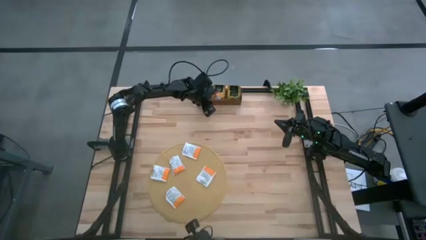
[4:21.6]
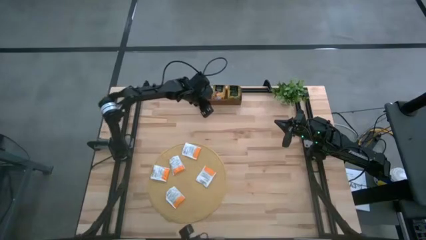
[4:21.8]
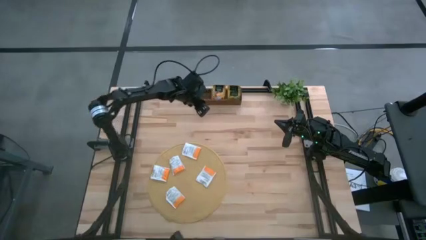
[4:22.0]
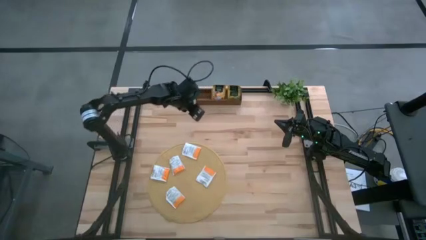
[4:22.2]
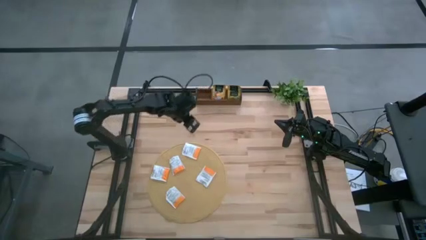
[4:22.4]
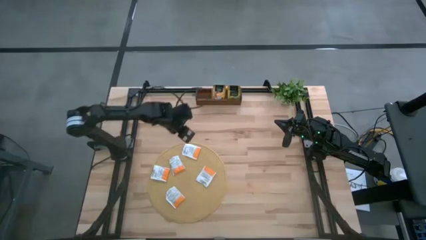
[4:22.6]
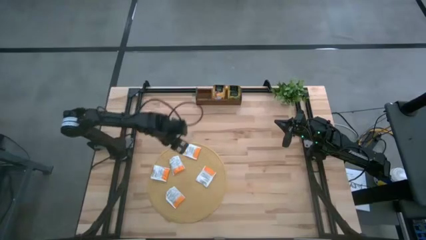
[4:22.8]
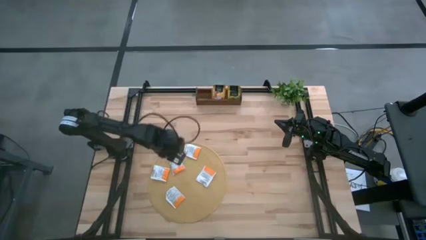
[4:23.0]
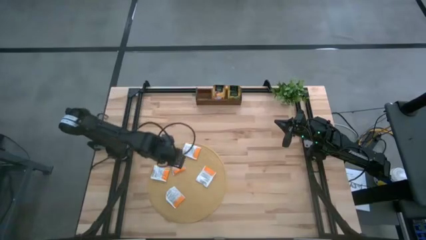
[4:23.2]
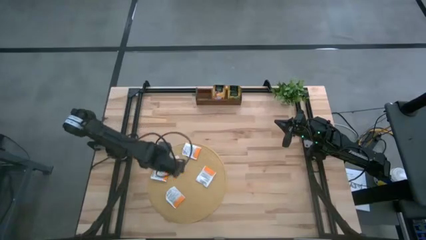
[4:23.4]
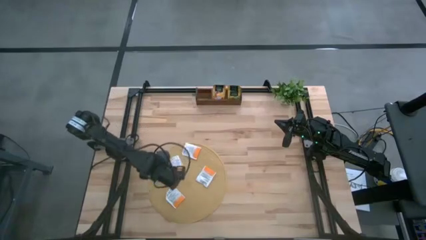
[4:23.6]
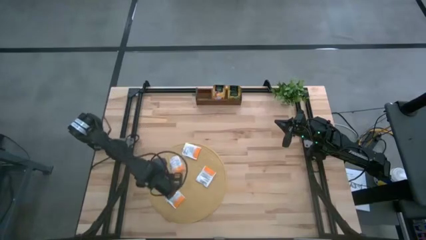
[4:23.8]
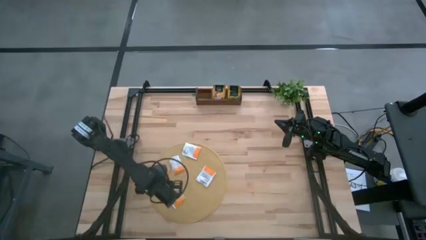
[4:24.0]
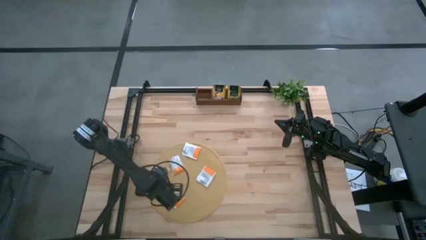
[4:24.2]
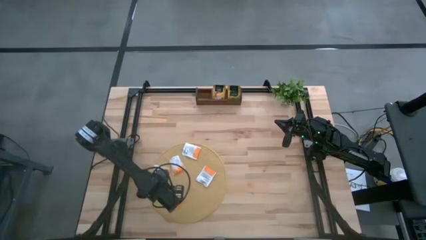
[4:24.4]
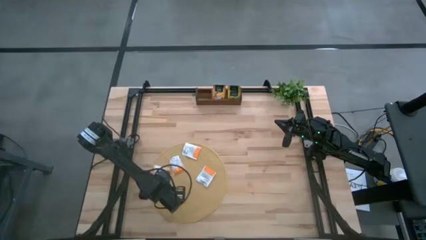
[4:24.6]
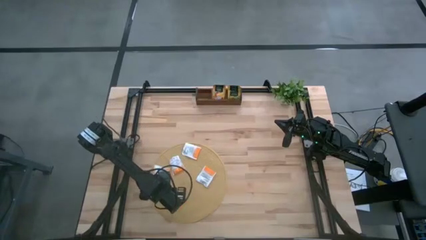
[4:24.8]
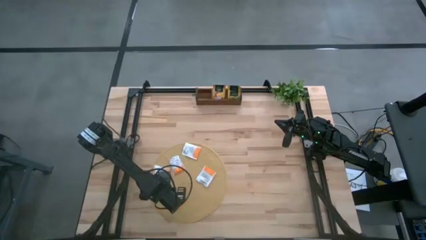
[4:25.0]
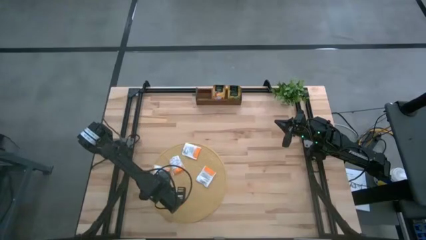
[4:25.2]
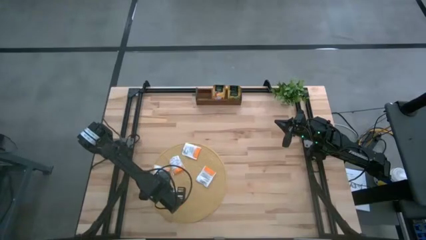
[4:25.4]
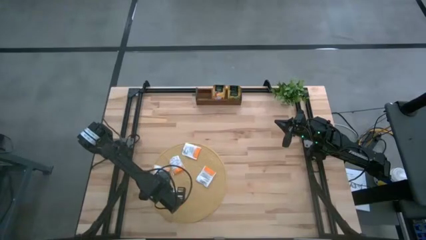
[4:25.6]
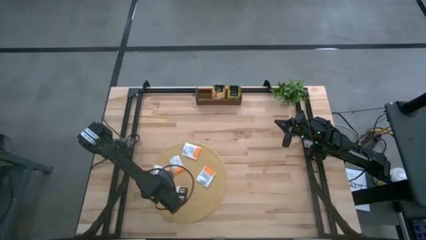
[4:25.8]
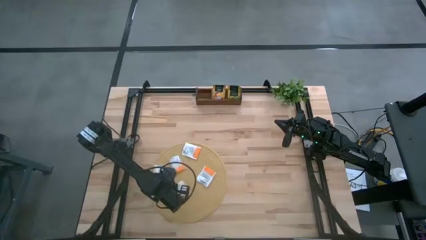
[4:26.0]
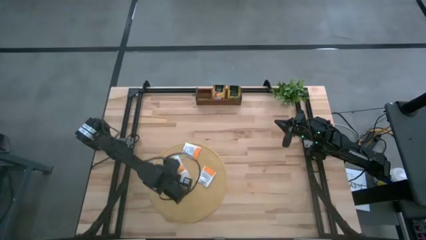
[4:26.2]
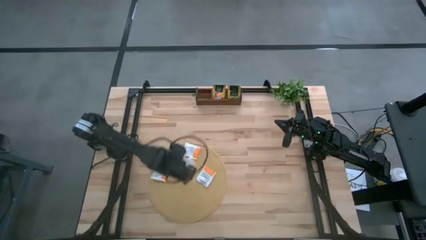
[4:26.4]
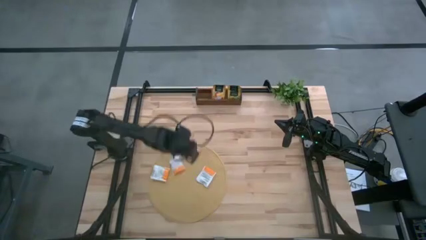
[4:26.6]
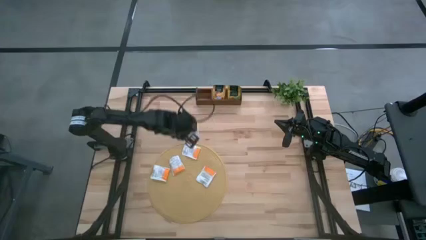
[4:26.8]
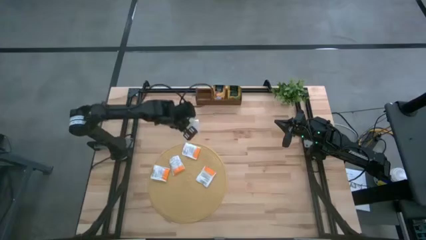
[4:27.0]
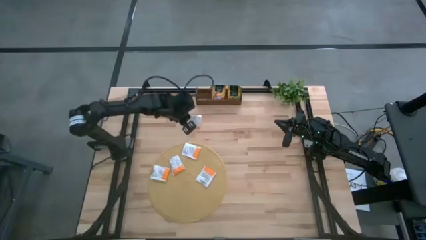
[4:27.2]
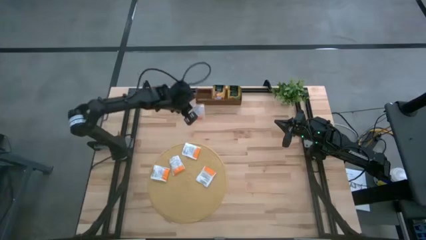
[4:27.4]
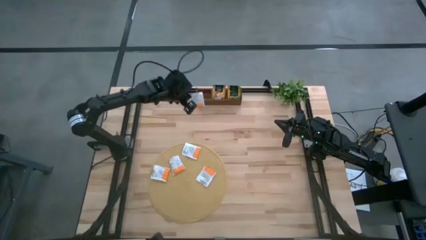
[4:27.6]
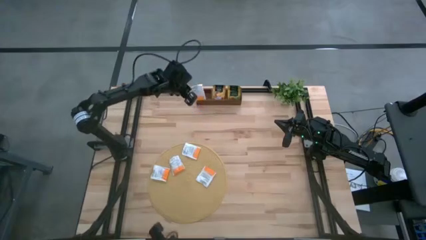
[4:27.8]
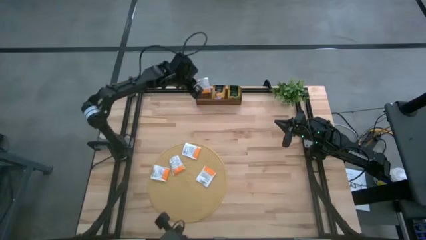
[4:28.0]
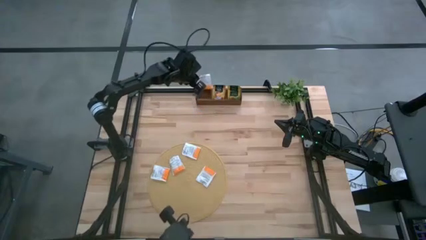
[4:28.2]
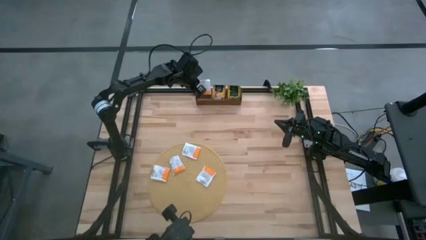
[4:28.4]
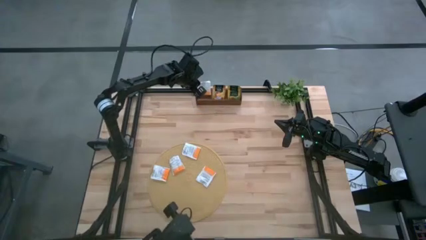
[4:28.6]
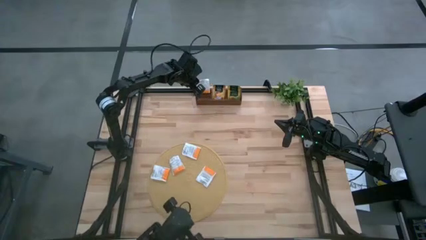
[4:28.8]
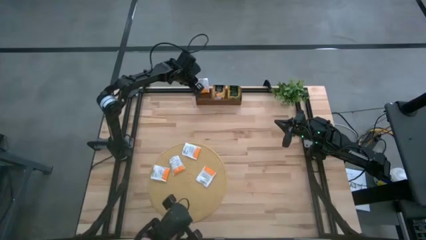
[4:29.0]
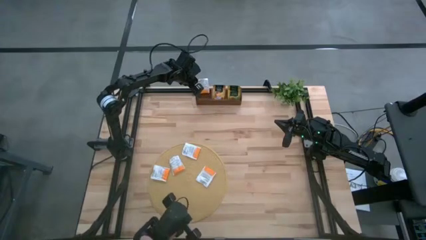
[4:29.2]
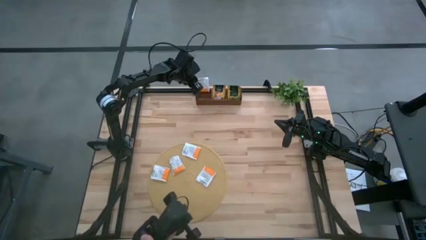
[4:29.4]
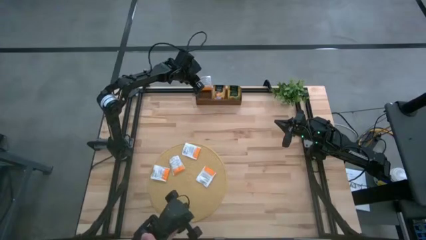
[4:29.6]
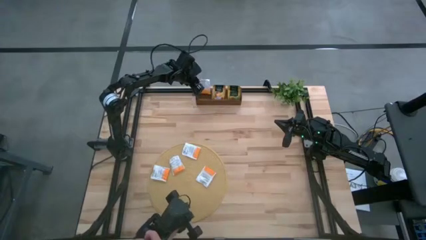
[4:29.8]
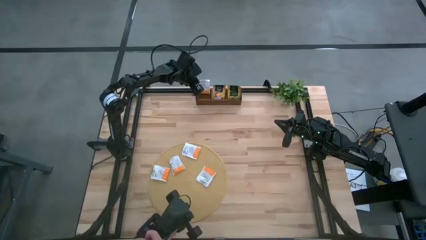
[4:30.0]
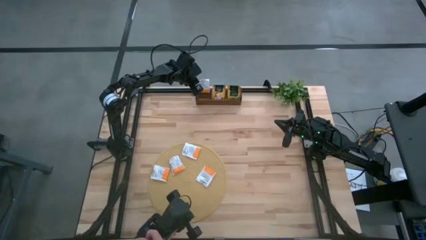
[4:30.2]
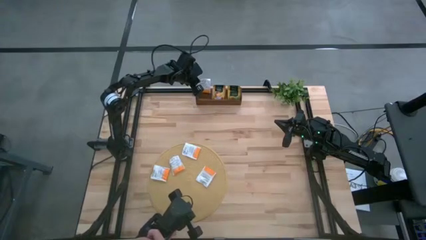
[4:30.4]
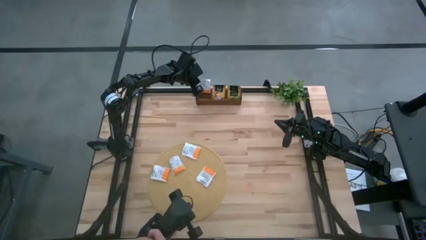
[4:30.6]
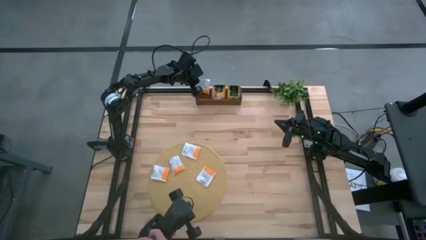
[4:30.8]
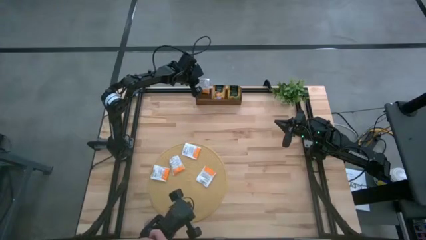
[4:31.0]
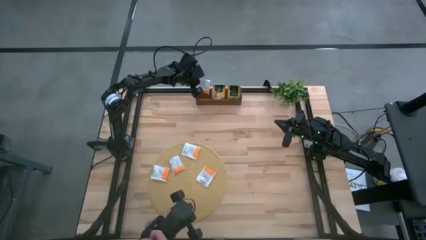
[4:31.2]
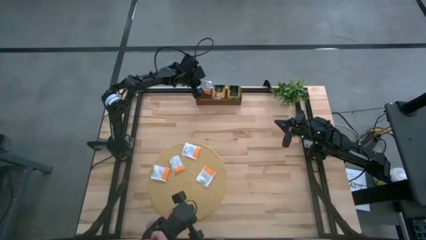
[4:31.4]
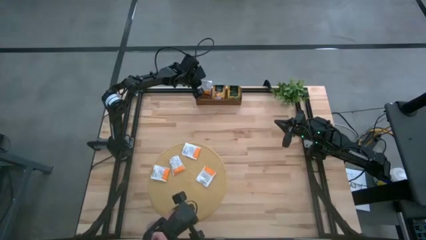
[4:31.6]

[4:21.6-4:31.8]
Task: Pick & Place Tea
Put the white tea bag into the left slot of the wooden organizer

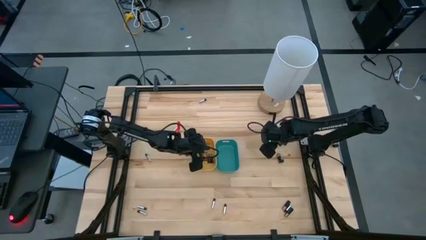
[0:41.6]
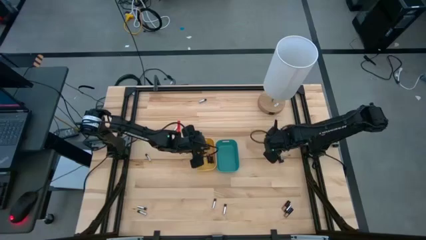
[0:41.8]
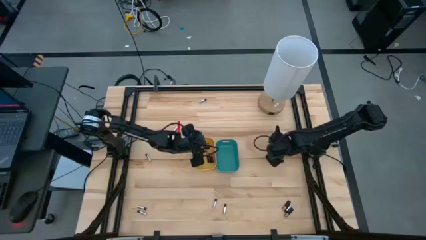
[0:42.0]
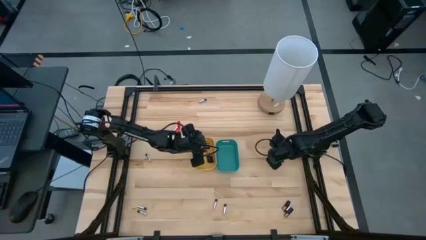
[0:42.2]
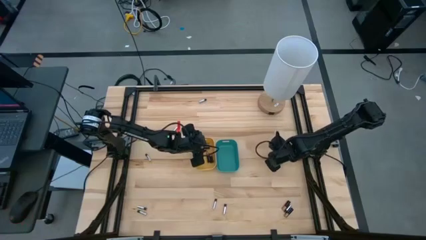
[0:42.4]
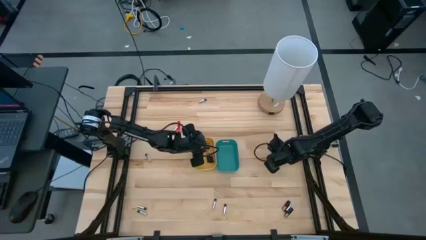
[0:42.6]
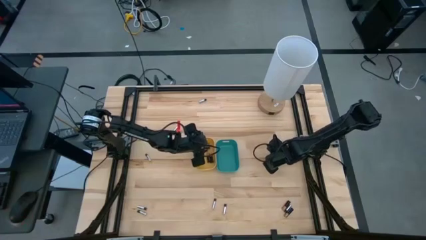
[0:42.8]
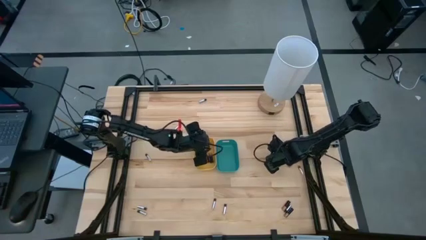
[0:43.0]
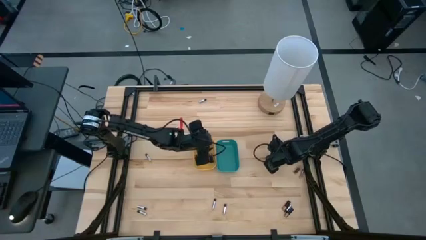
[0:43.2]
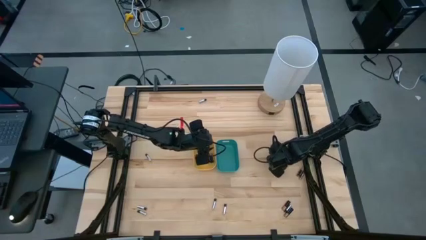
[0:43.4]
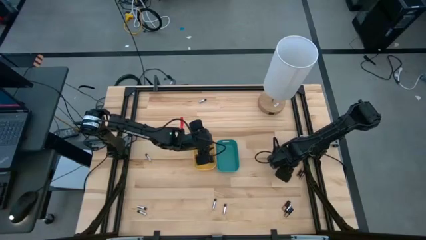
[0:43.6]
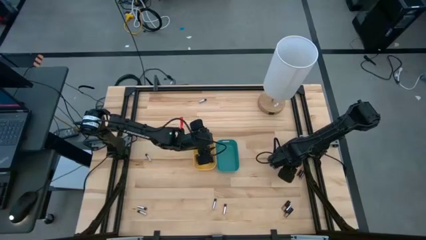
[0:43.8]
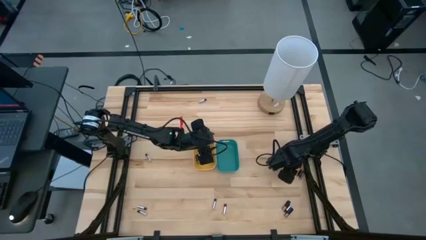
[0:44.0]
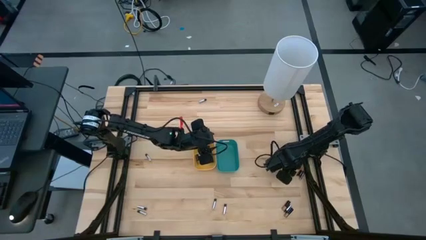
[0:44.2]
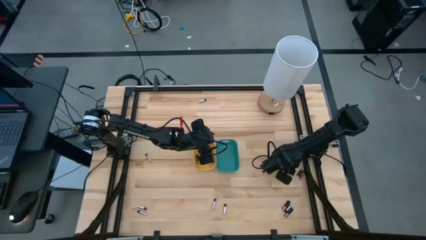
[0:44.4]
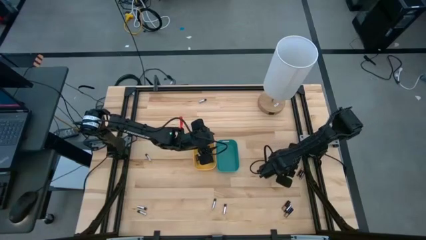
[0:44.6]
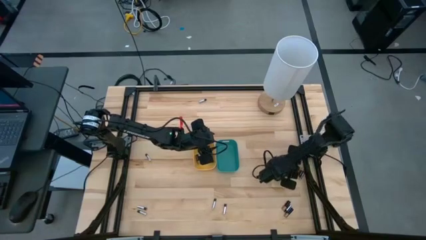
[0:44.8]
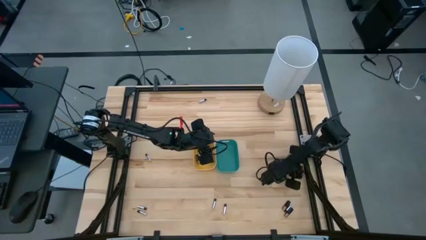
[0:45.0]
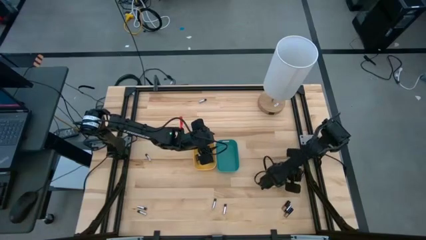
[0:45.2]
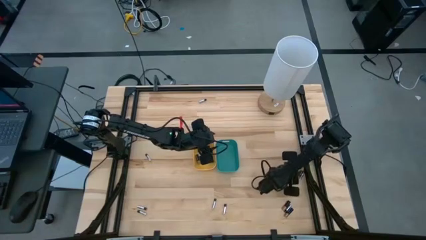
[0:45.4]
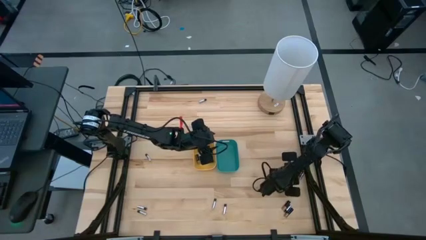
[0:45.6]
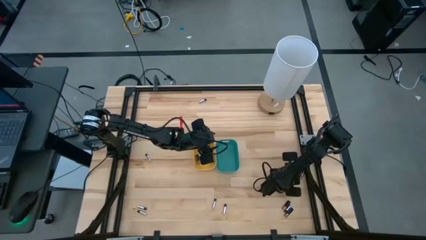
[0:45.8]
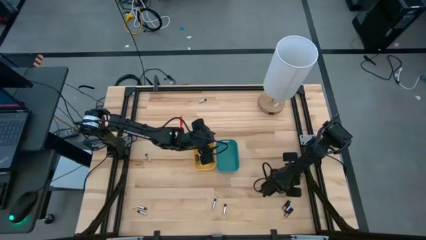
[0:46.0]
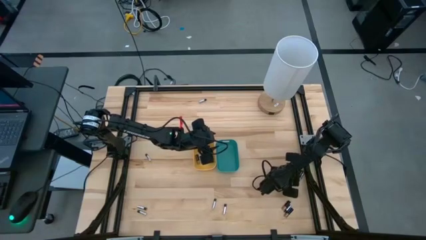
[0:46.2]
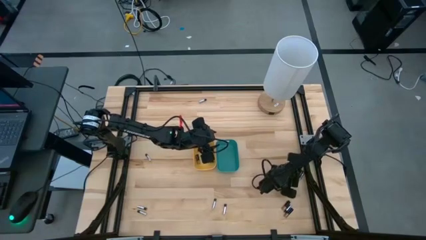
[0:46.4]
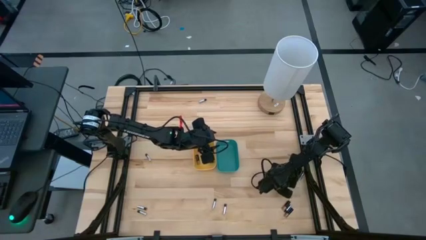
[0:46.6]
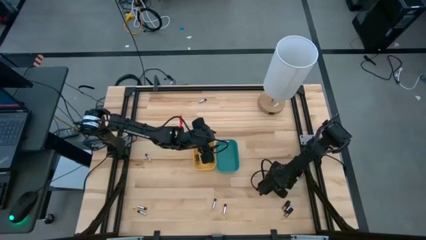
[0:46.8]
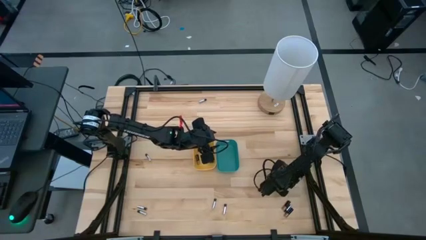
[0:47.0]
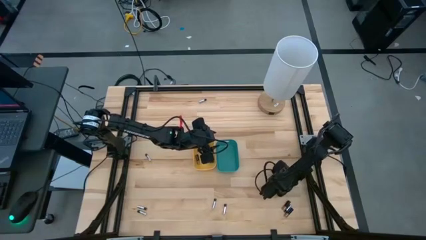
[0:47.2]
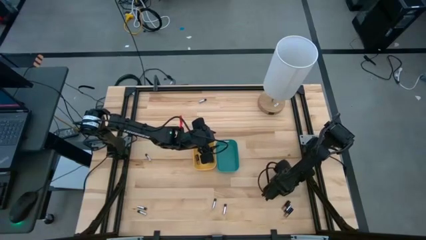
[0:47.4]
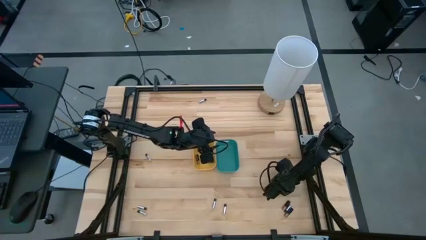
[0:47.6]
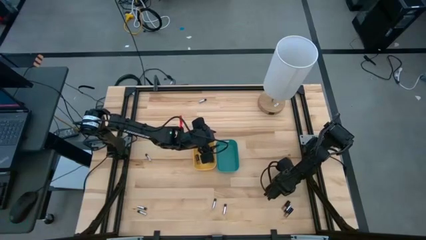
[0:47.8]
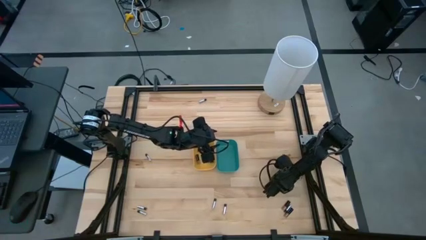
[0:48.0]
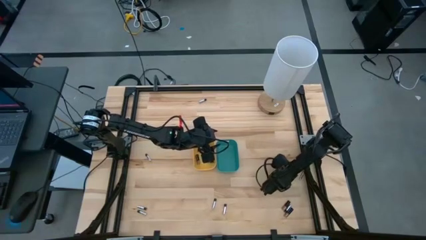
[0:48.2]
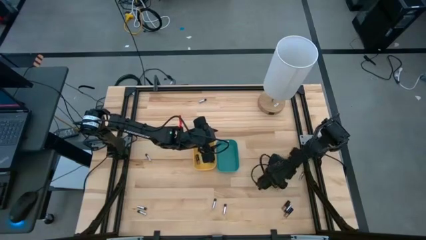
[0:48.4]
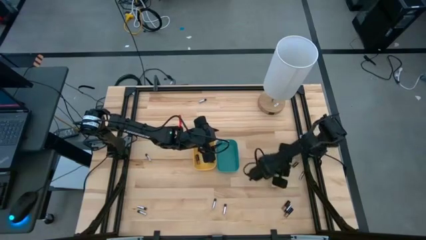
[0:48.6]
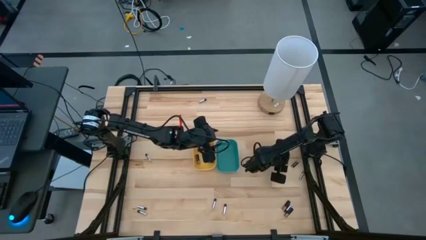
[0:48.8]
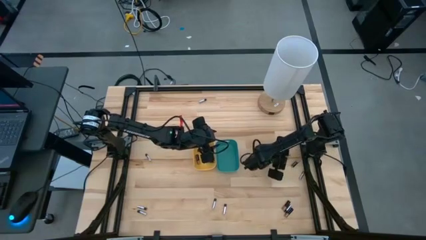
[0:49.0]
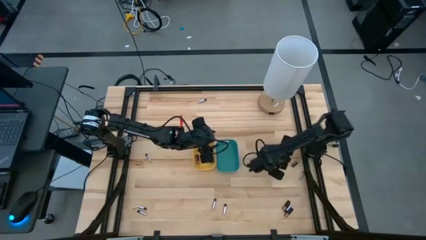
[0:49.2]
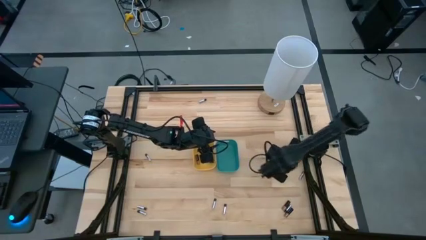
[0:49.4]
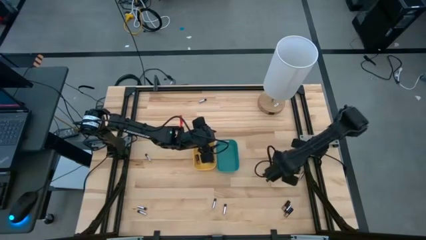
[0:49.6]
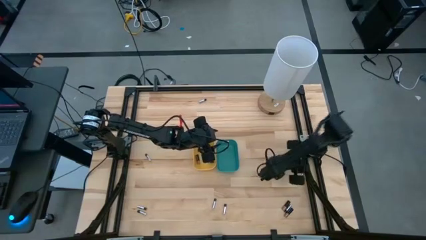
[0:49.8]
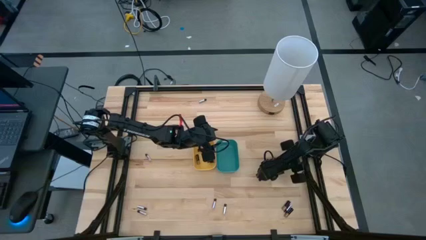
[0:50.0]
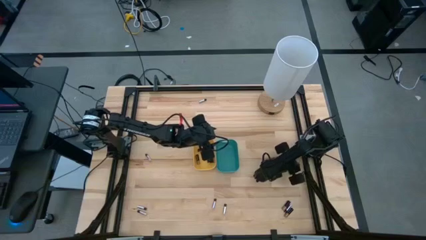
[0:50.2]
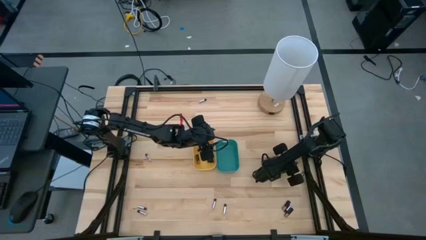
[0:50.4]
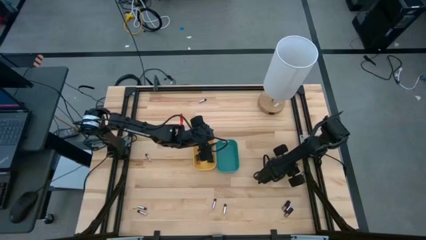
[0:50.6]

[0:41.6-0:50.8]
Task: Sort batteries
Put the black battery into the yellow bin
